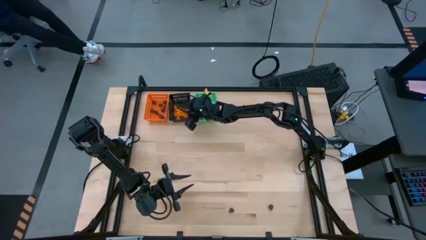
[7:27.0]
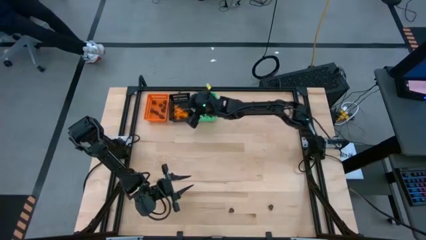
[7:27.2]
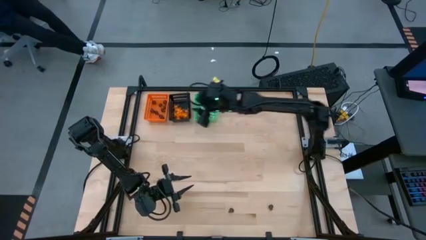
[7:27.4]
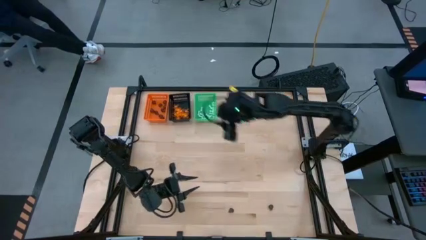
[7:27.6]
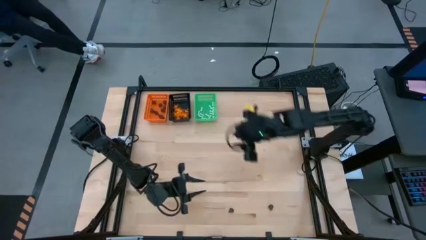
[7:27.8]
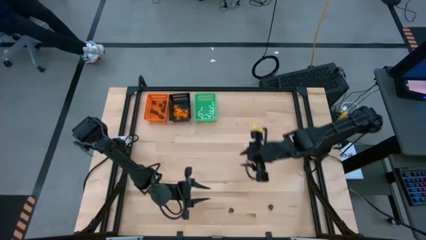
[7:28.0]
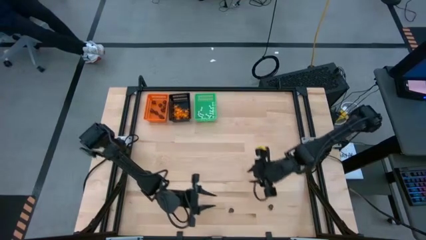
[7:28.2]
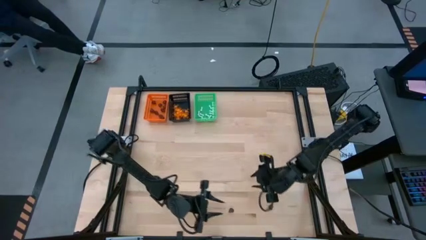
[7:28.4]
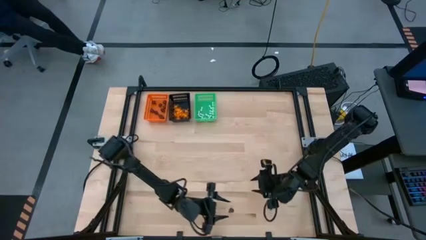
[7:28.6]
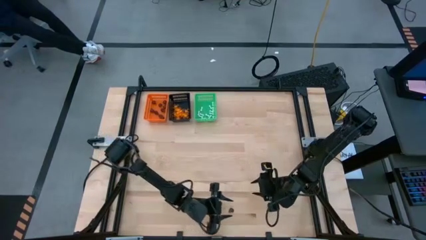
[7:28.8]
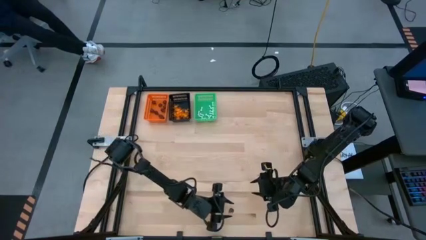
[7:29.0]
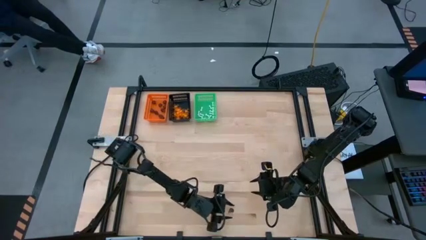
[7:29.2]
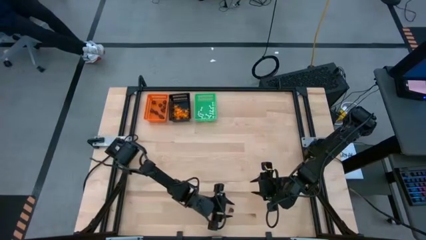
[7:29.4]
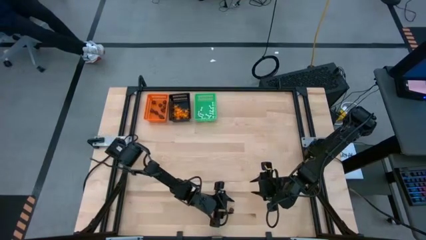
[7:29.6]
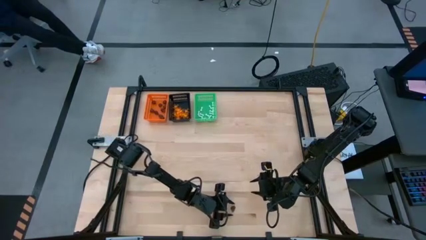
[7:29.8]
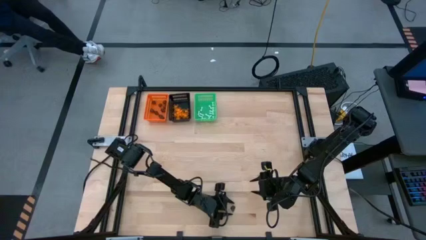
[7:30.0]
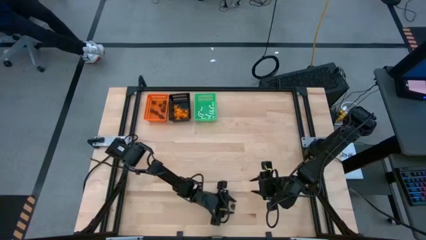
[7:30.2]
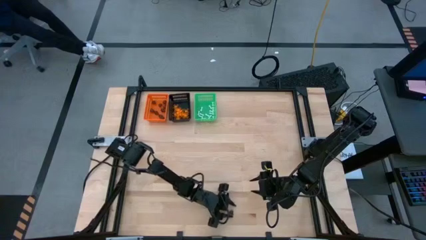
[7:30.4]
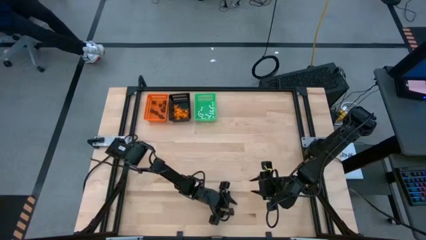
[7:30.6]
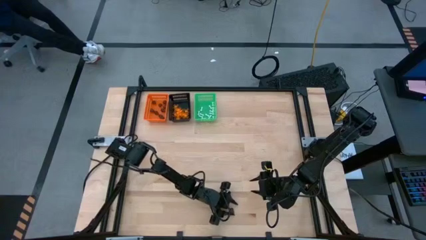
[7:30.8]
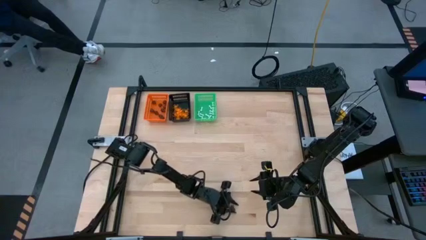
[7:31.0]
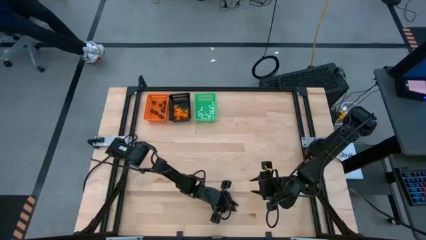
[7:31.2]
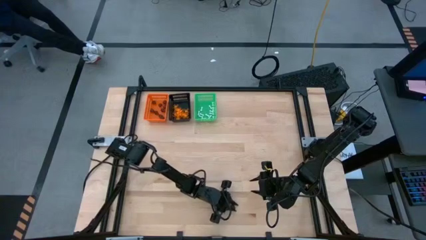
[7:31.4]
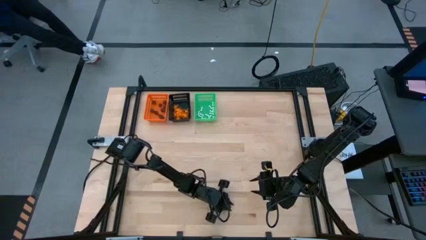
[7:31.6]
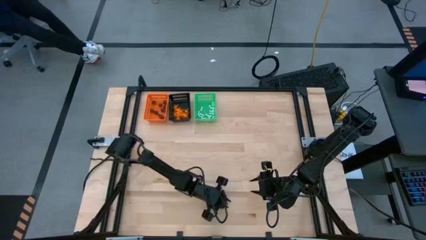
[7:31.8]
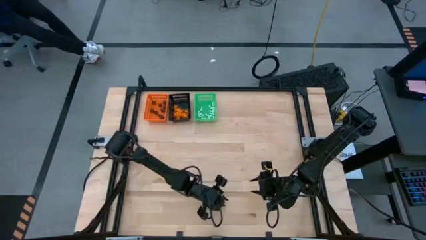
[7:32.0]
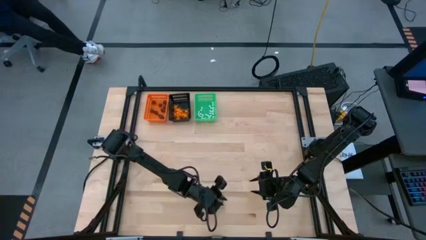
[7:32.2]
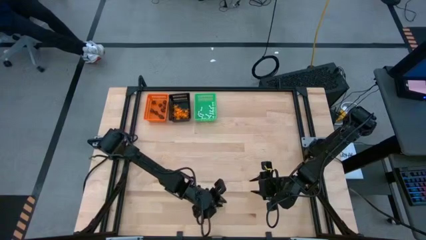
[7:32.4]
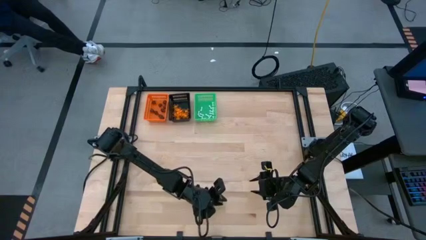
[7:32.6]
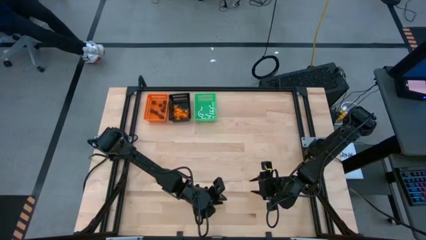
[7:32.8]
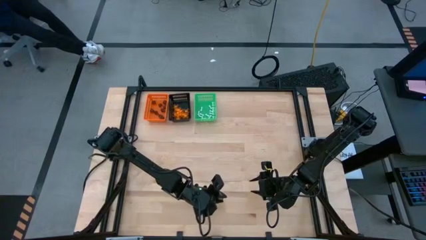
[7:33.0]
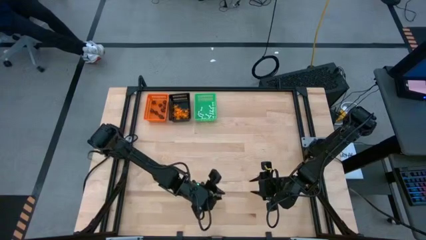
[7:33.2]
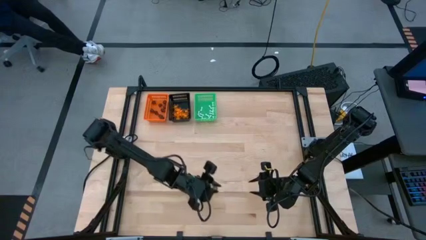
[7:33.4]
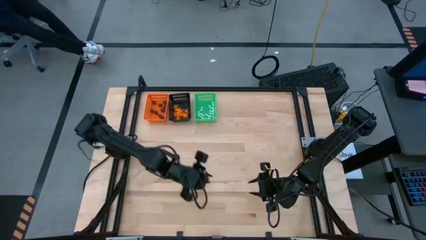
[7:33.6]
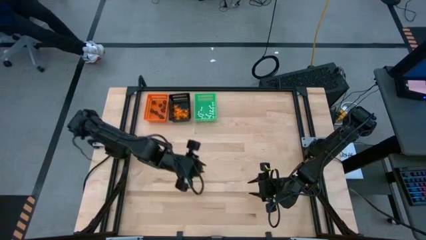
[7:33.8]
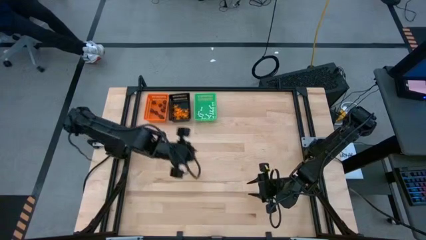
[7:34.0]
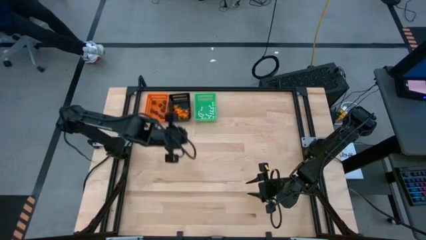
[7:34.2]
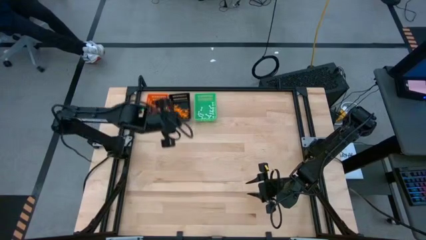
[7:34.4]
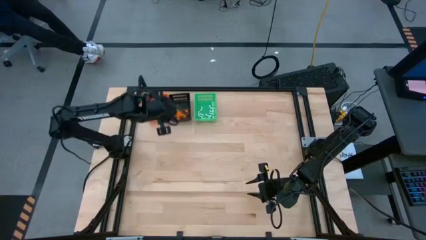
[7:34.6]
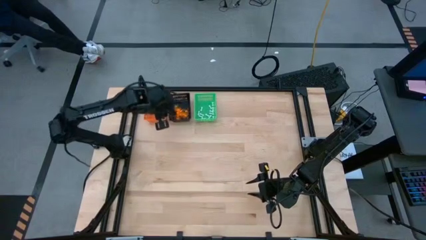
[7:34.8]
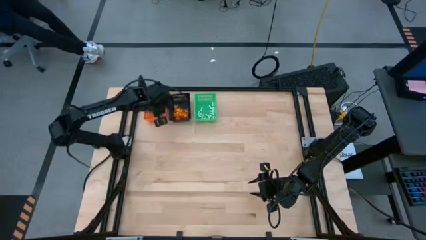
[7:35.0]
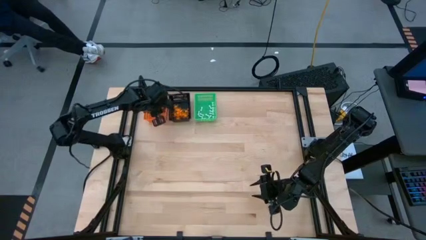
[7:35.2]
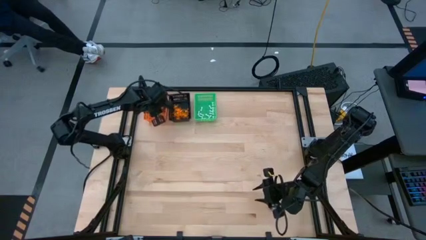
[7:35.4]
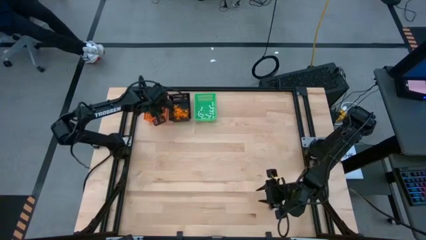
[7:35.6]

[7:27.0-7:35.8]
Task: Sort Halloween decoration
Put the black skull toy into the orange bin

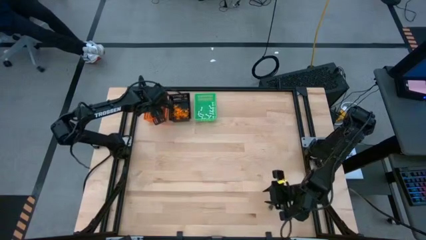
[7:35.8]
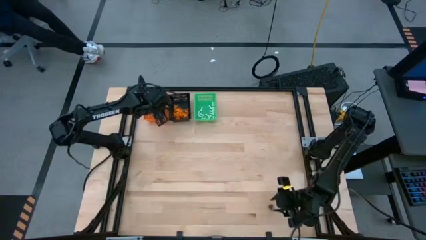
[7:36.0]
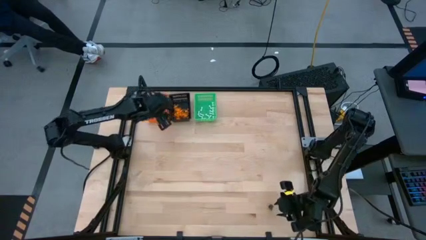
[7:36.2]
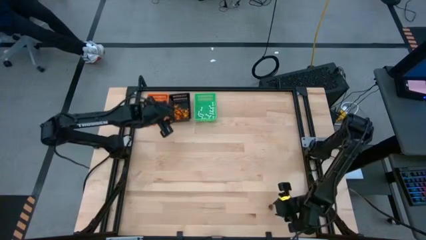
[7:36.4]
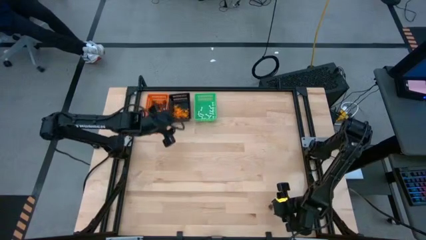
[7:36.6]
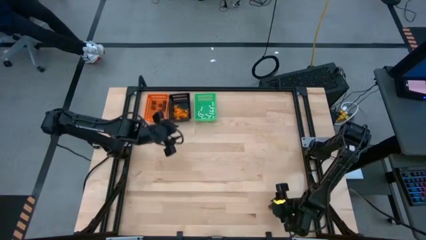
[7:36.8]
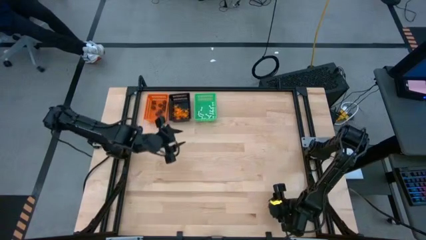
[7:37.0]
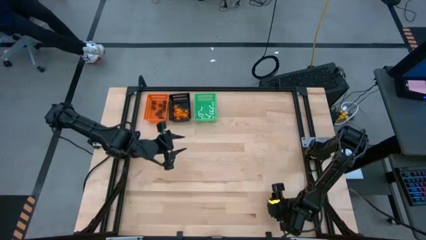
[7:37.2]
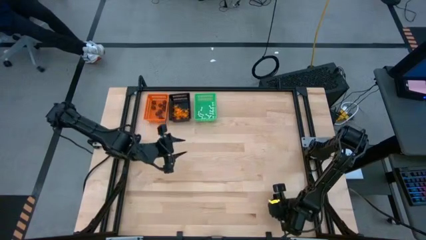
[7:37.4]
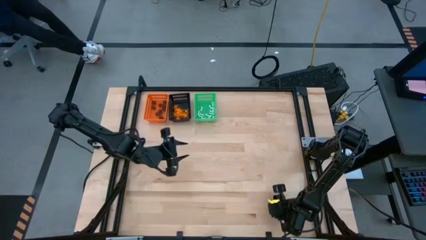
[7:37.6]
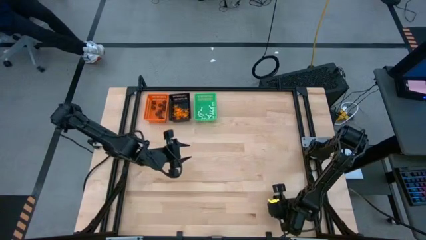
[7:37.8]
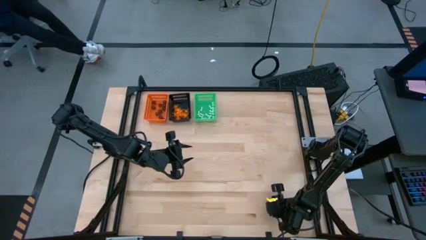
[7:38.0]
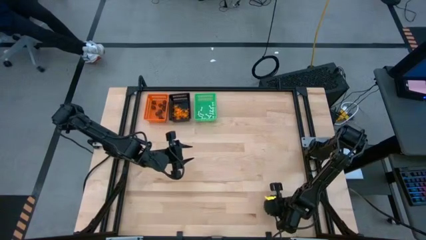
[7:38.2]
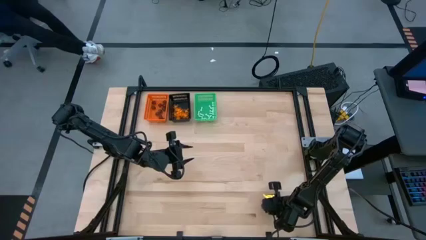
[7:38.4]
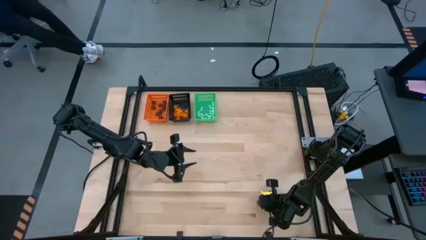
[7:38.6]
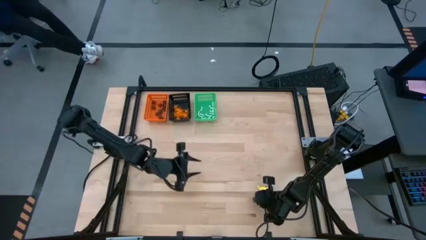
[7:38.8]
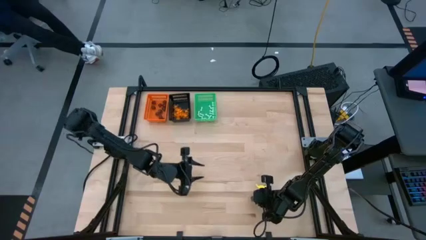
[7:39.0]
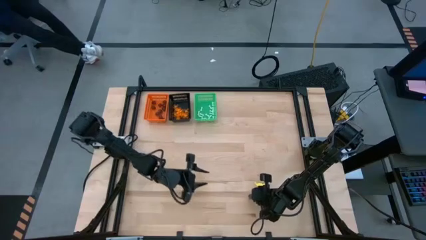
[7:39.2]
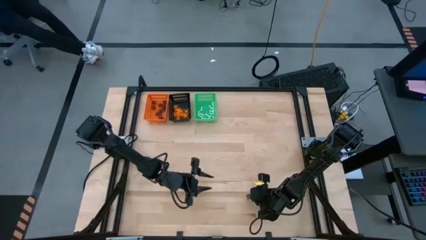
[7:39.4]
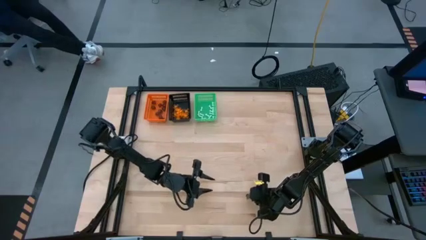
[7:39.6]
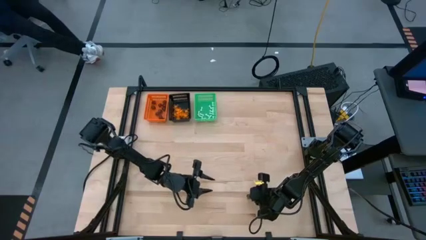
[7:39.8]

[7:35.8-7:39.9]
Put the black skull toy into the orange bin
